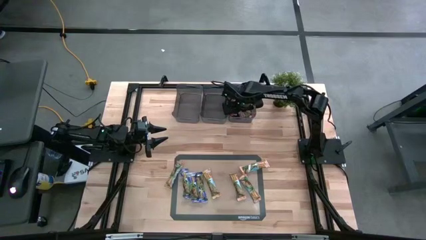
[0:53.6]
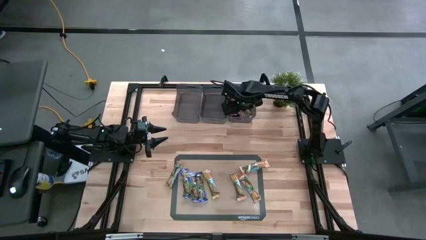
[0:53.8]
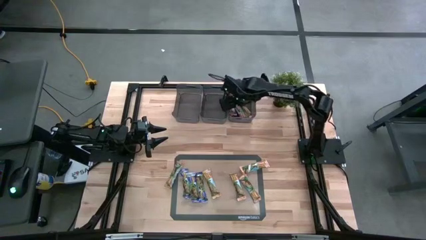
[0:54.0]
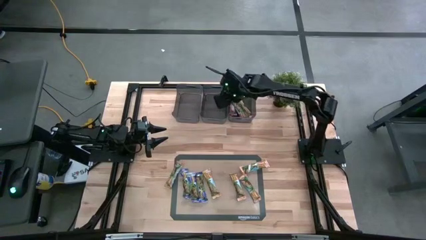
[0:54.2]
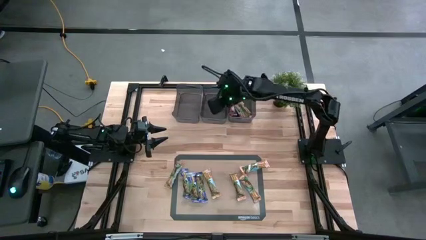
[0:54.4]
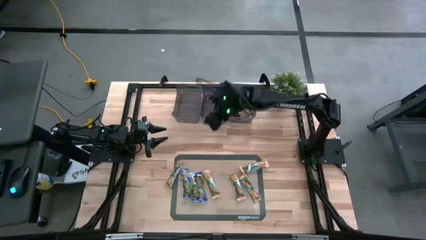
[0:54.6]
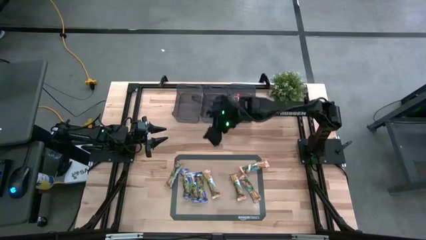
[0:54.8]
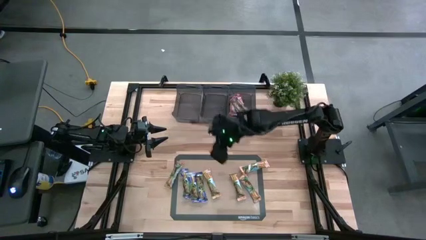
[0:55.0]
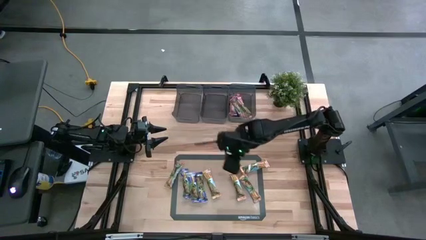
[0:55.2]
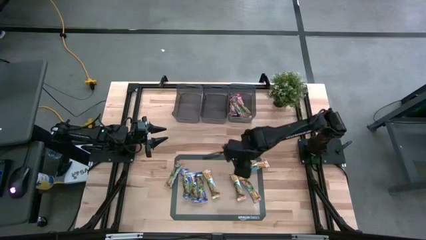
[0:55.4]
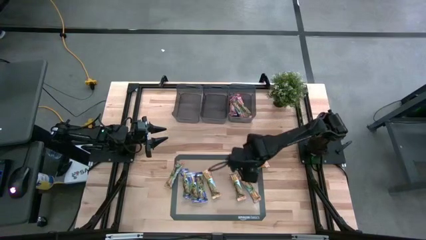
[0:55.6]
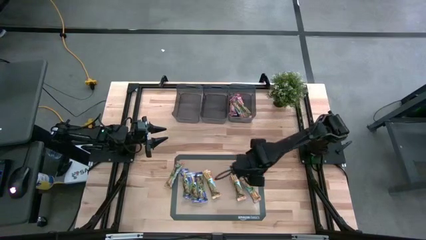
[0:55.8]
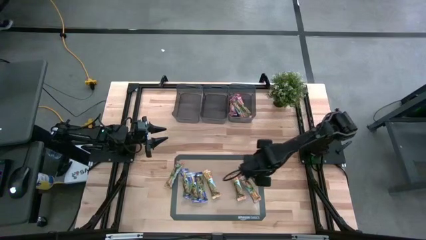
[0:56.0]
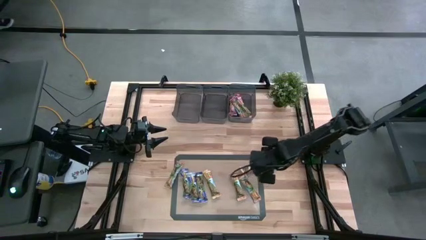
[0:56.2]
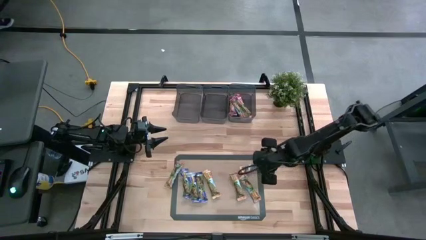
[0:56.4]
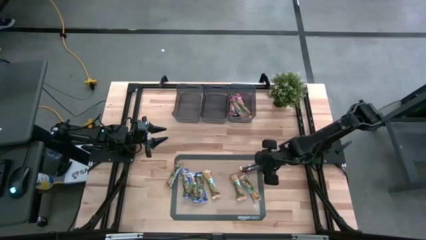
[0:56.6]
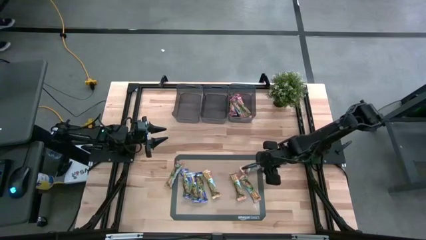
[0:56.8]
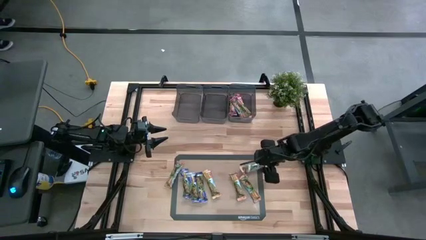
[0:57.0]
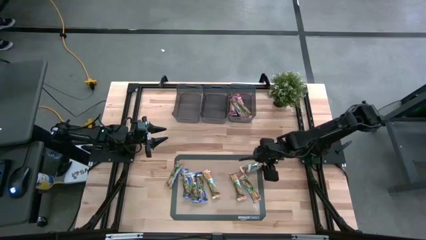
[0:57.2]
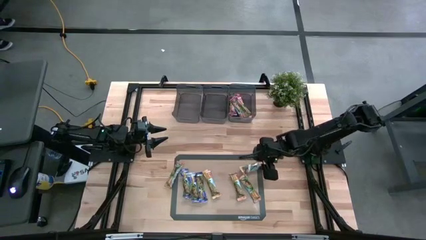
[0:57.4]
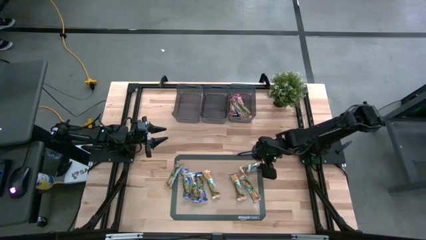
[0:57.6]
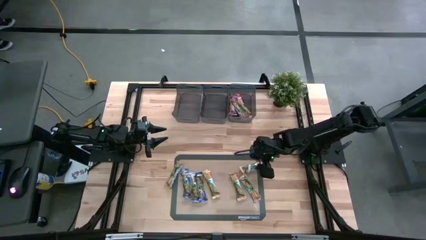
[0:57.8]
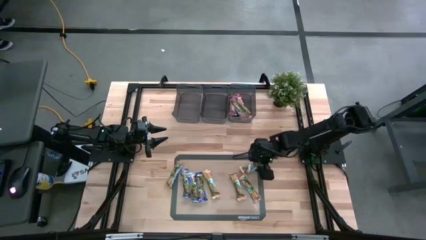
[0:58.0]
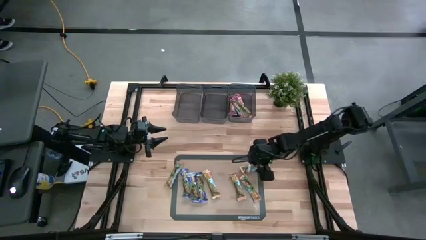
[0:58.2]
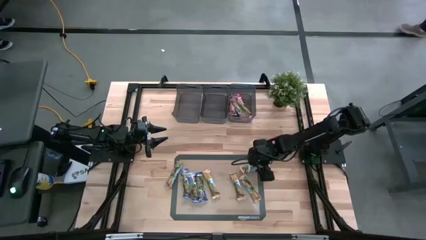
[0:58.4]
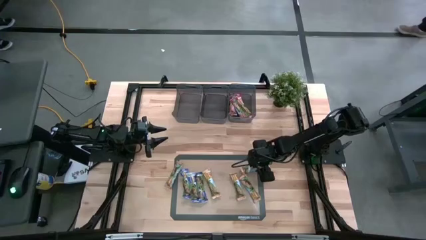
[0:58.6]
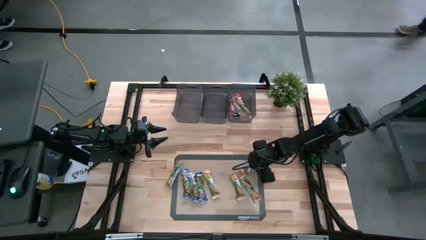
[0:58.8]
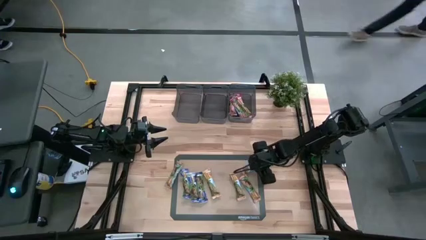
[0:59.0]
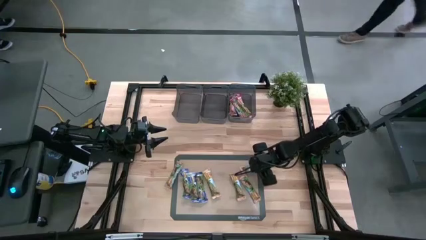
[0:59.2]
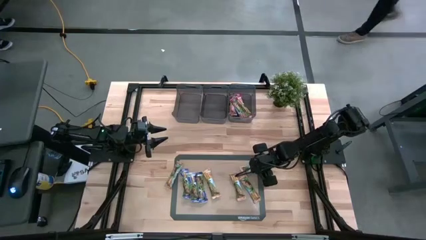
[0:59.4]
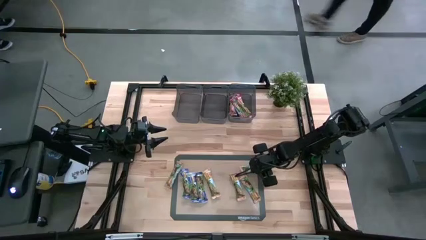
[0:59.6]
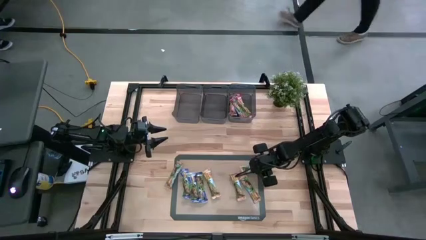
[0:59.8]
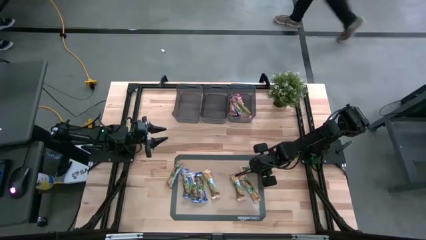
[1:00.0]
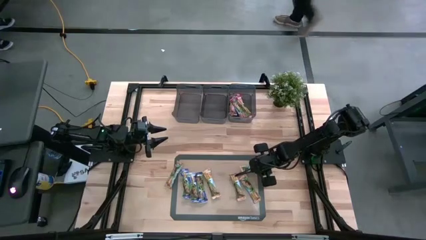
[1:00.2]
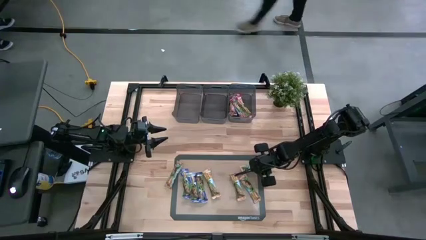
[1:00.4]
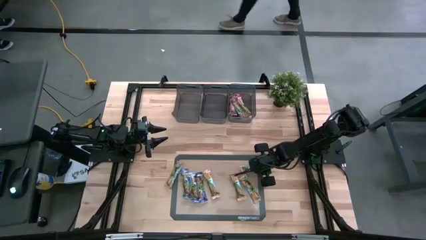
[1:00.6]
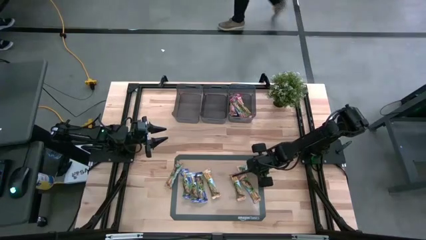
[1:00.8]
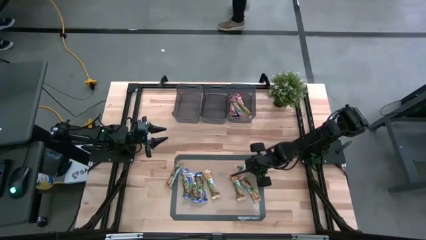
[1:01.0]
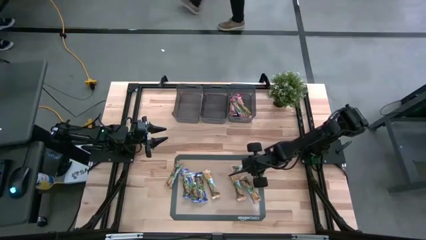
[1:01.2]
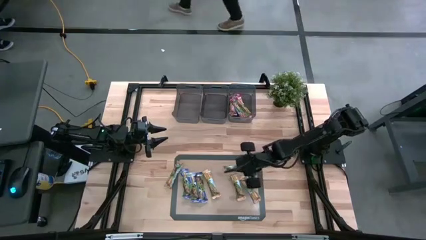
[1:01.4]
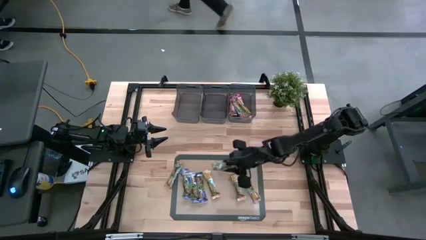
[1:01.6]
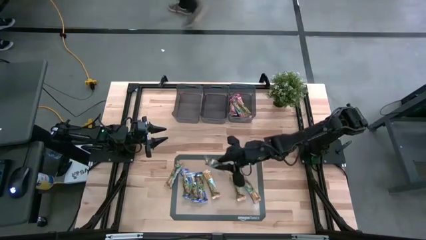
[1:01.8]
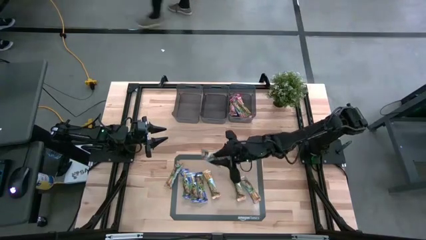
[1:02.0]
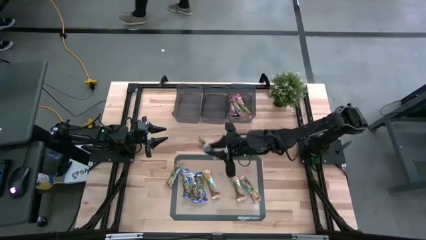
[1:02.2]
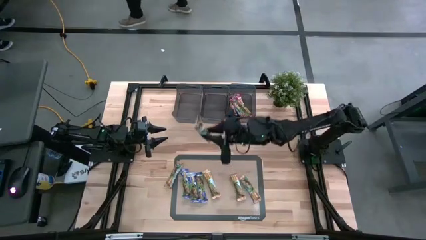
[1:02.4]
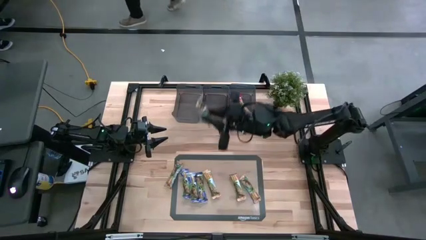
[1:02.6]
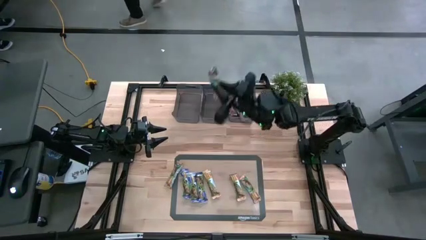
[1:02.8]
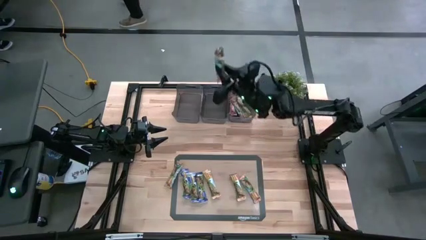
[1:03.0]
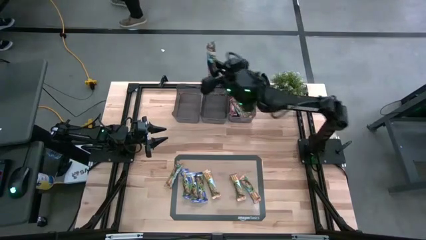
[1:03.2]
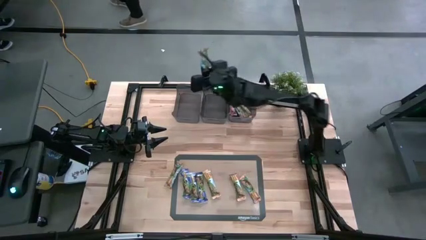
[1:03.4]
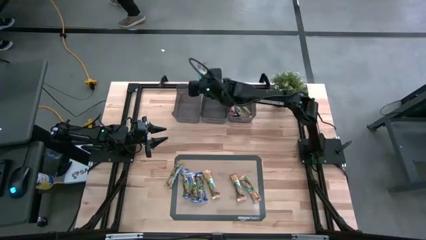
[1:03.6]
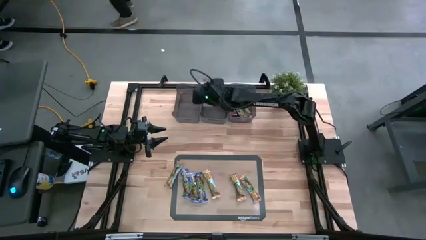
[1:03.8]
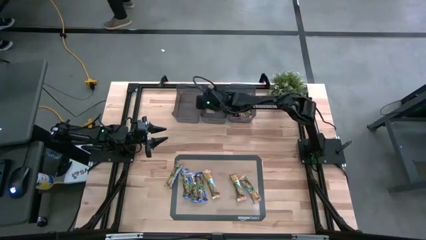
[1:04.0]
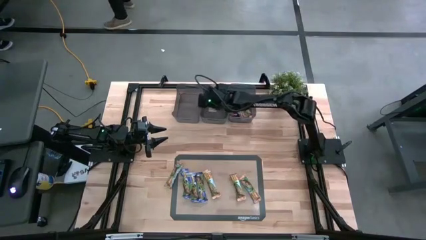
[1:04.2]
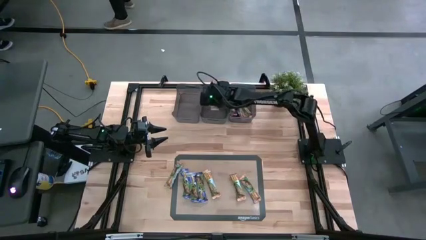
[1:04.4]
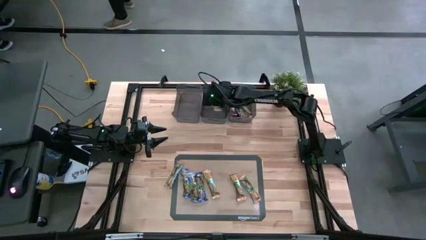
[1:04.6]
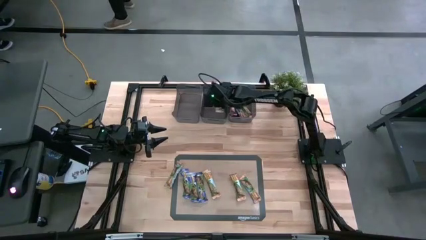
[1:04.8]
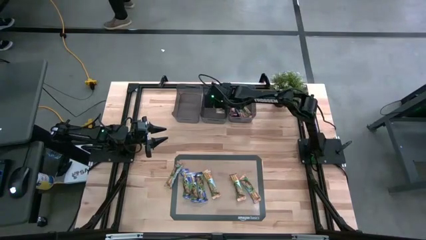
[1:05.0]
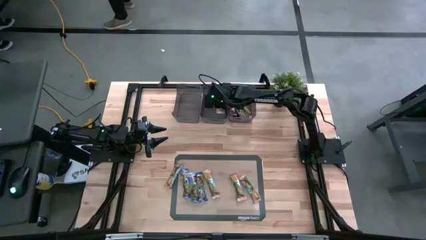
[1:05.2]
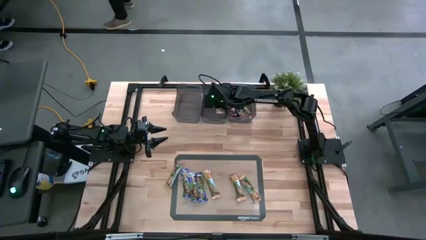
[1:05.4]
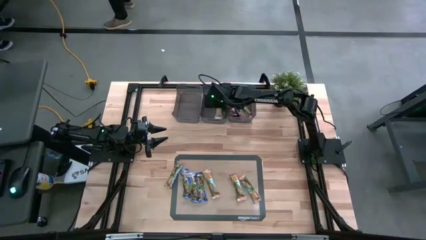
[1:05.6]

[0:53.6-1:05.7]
Task: Pick and place Granola Bars by type
Put the orange granola bar into the middle black bin
